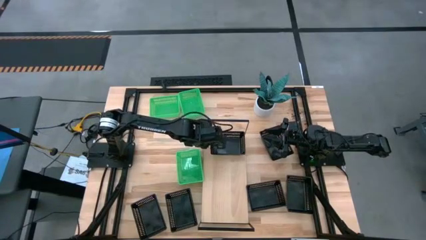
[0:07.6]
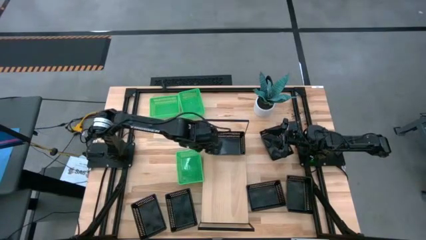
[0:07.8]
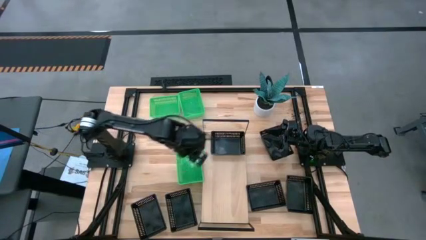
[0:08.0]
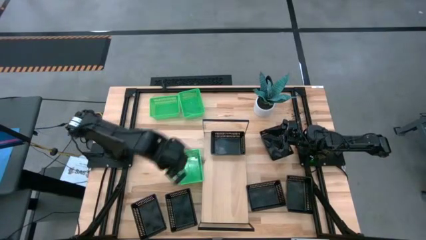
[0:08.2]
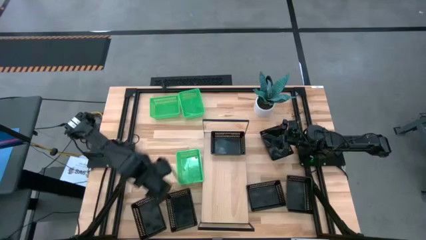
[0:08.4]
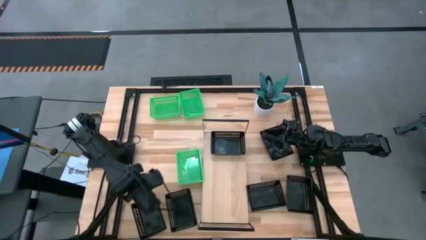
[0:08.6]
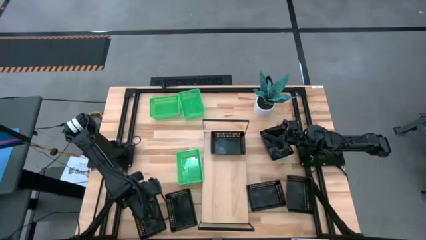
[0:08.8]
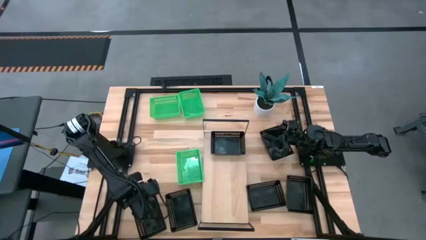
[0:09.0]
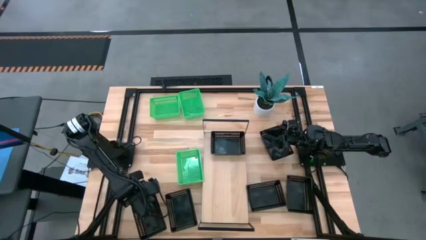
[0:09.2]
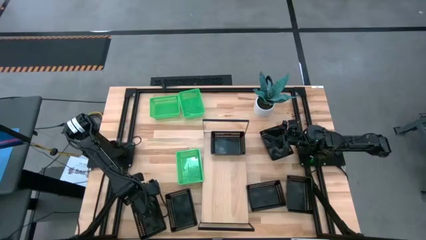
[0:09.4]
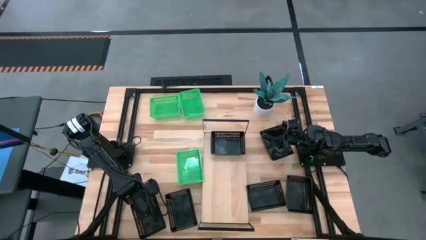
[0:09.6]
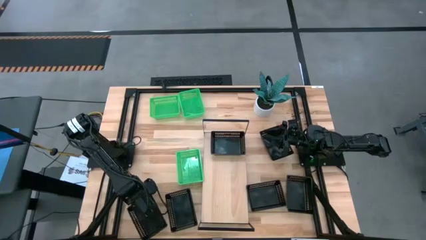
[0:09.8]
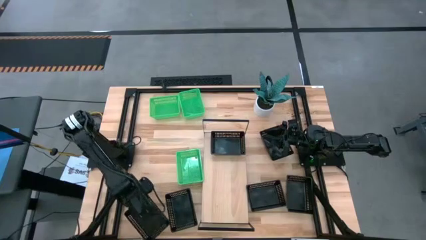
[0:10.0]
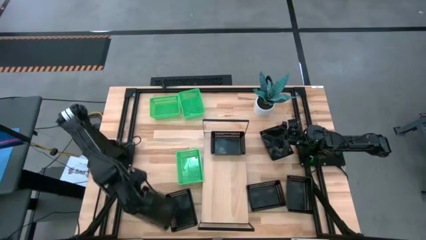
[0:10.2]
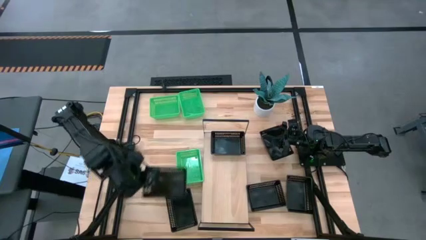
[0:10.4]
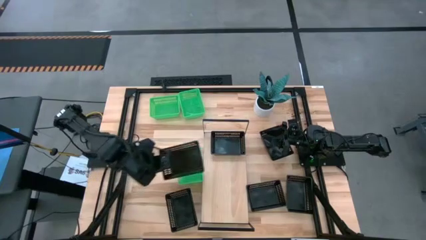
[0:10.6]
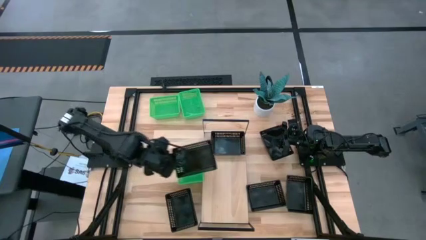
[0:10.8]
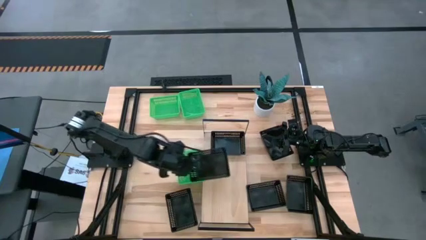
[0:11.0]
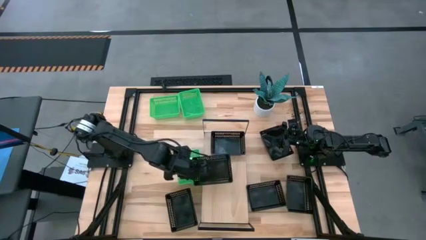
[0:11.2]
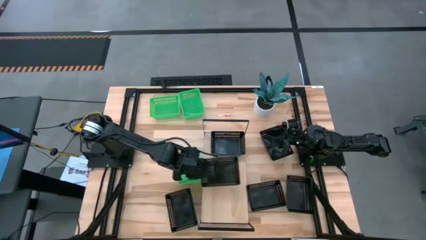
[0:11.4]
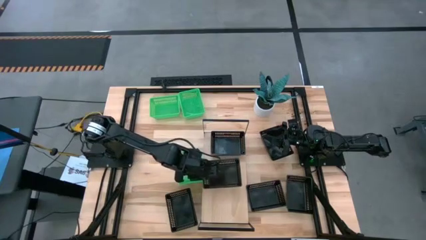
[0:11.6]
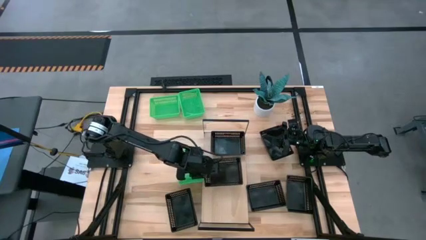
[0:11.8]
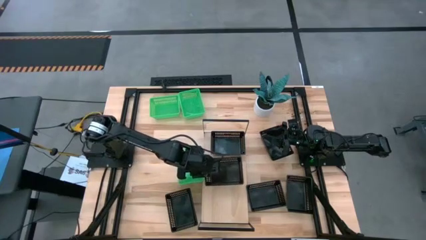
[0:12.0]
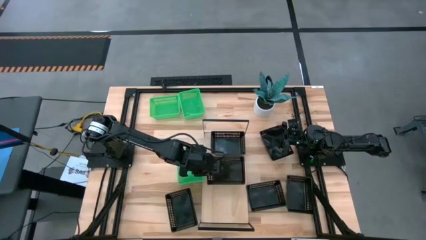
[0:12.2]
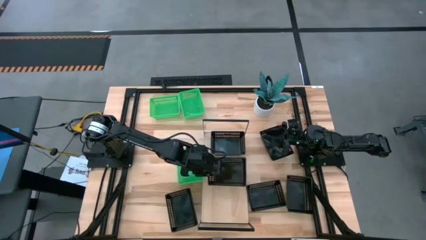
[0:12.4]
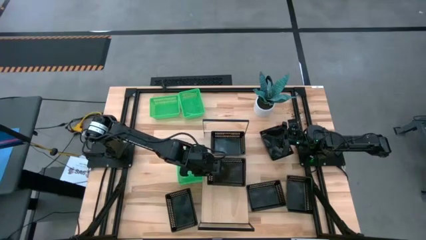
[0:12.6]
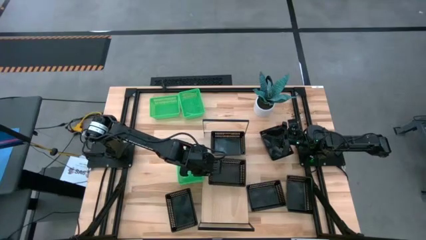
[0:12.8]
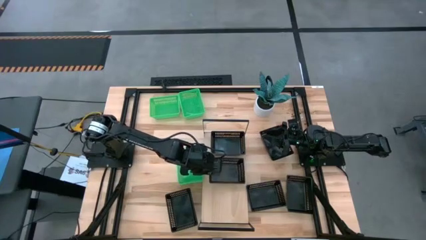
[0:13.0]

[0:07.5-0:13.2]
Task: Stack baskets on shelf by color
Put the black bin on the shelf

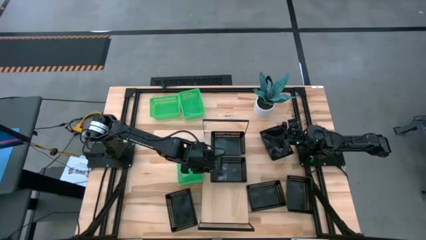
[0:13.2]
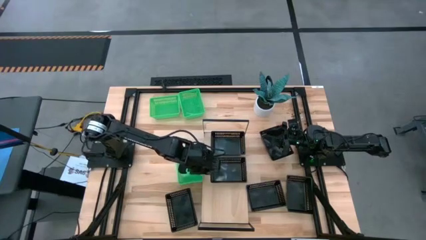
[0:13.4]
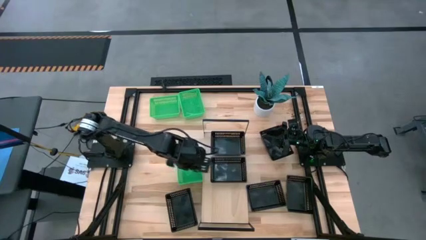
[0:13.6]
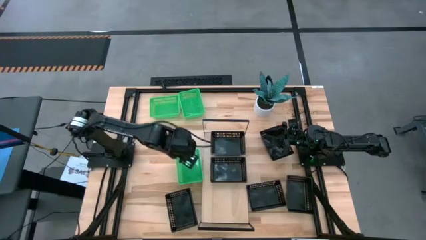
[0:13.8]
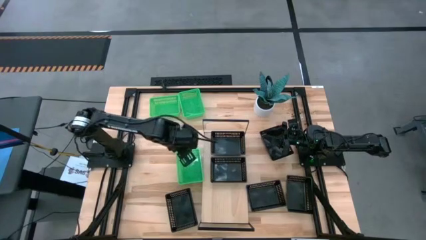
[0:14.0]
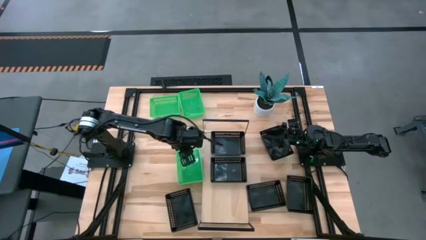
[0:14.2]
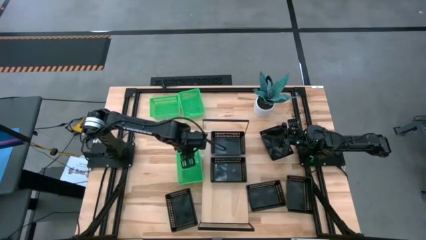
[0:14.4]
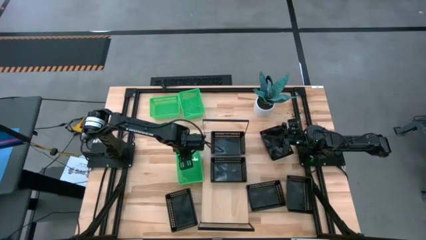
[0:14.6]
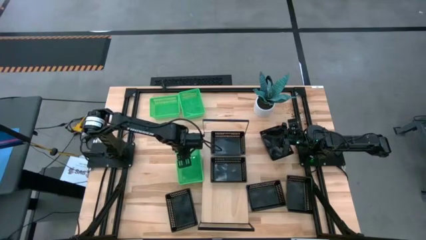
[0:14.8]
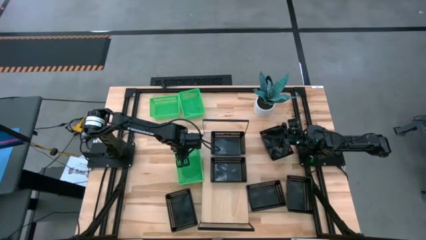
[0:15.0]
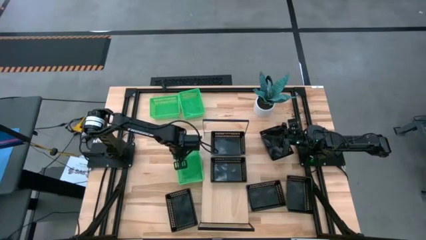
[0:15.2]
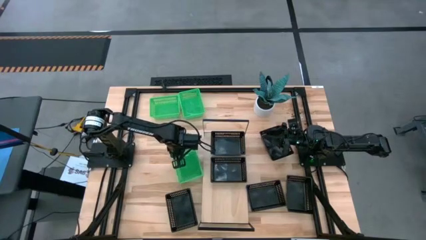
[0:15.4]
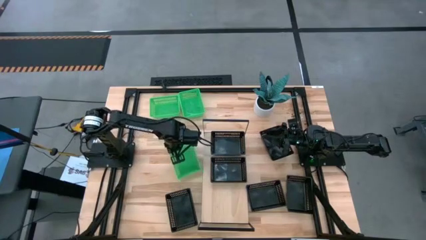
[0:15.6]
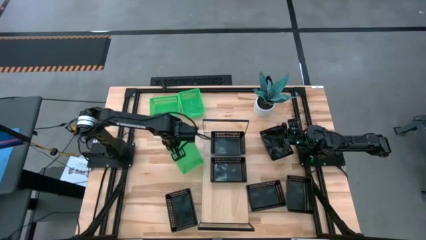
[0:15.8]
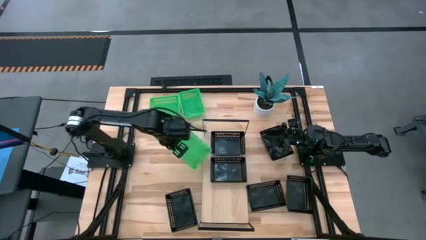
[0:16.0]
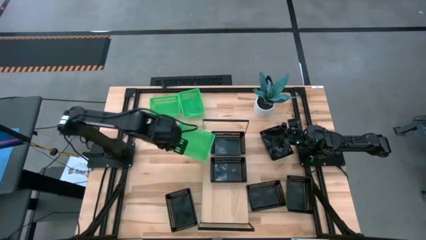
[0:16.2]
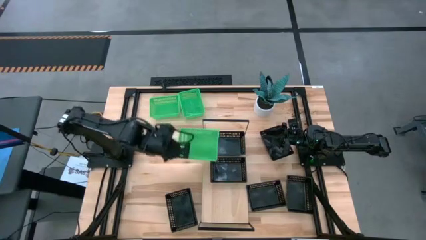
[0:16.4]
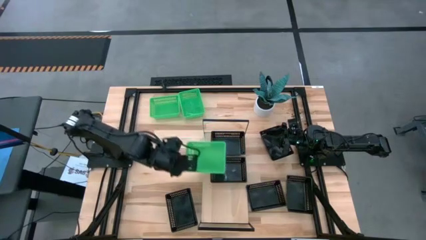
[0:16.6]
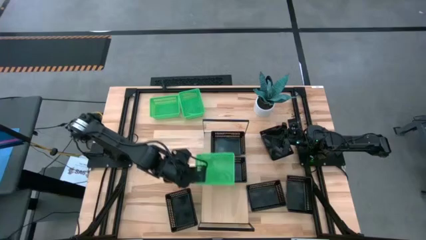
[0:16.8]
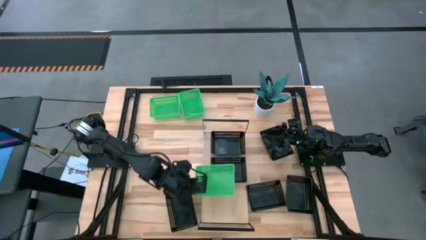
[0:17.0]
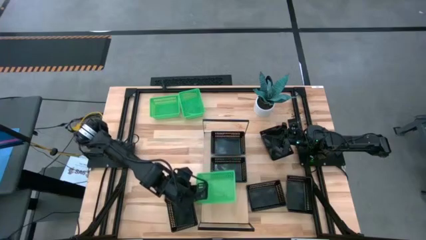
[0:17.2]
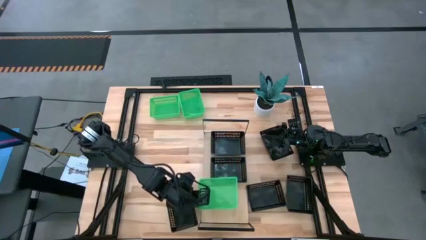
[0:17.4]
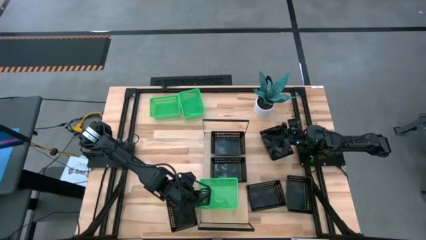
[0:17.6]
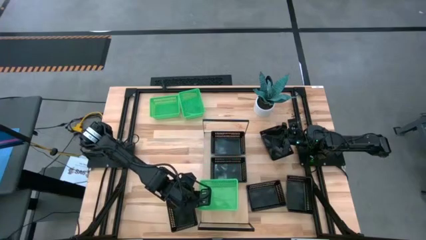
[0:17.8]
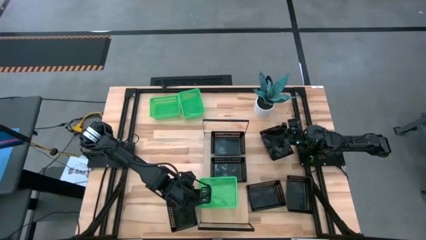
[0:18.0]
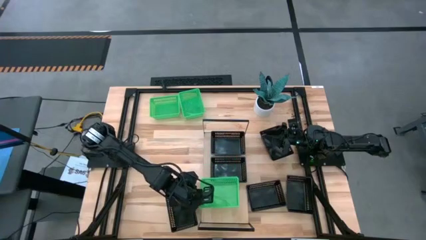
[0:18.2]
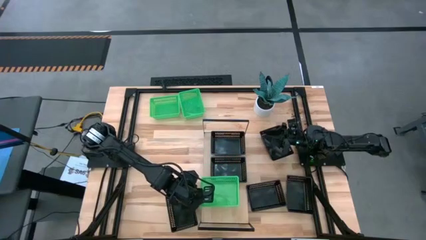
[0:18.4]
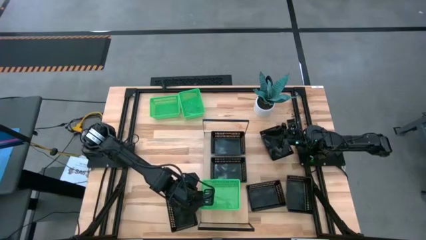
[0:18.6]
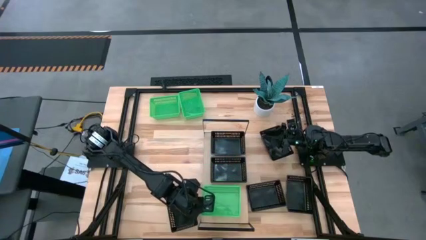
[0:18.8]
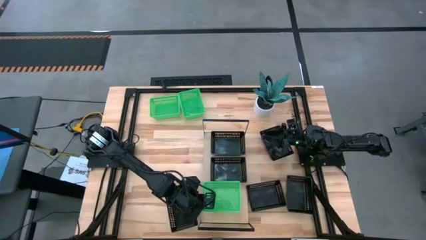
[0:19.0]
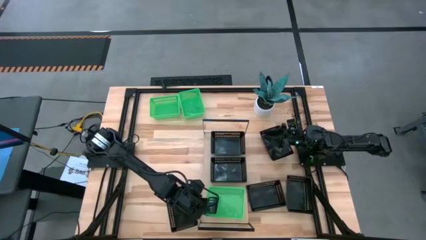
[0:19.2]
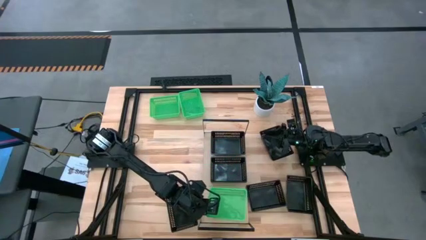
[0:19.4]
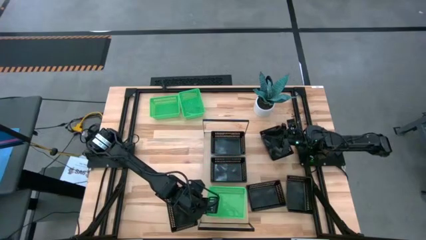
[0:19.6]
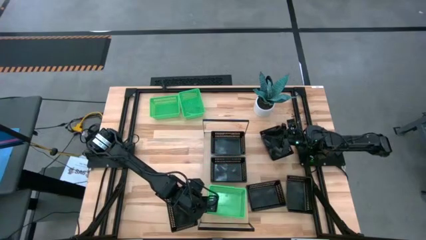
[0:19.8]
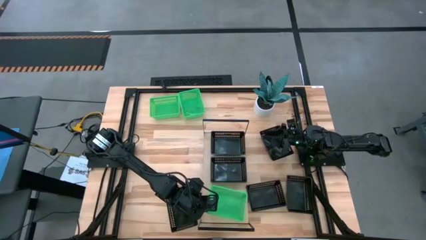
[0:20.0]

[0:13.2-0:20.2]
Put the green bin on the shelf

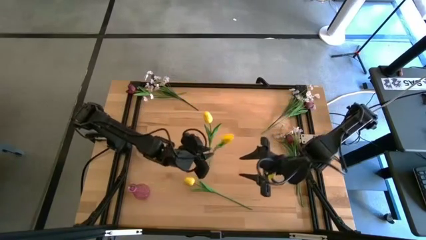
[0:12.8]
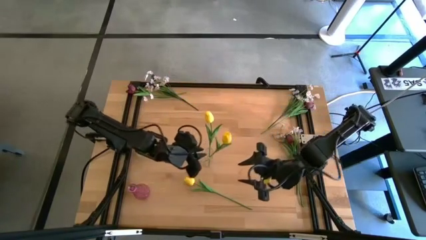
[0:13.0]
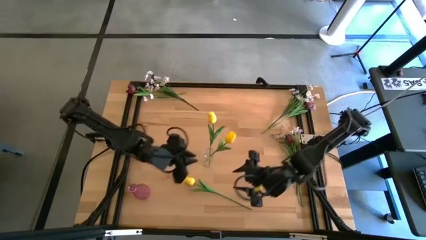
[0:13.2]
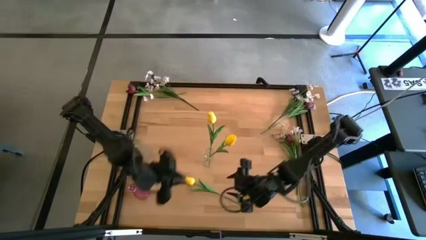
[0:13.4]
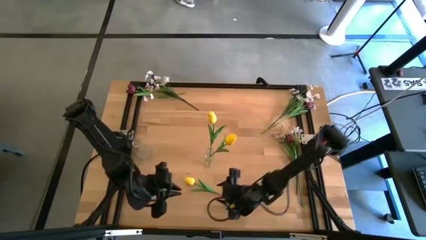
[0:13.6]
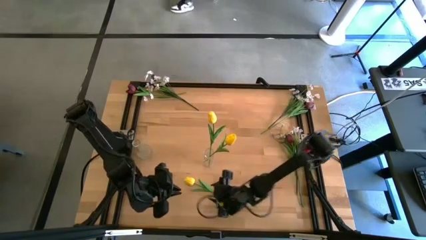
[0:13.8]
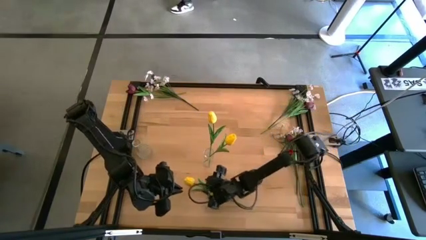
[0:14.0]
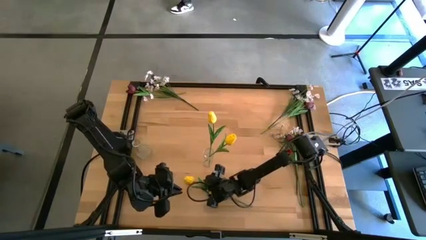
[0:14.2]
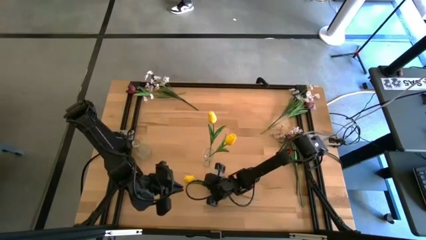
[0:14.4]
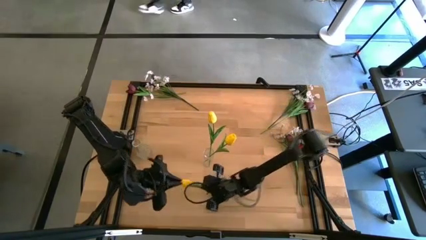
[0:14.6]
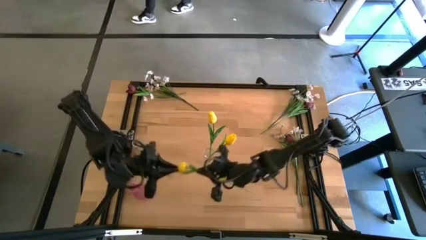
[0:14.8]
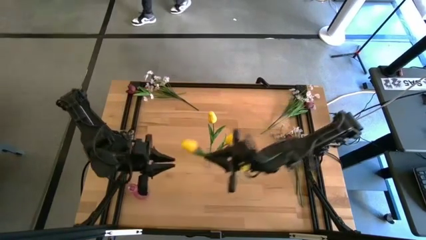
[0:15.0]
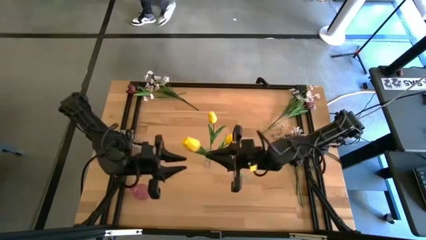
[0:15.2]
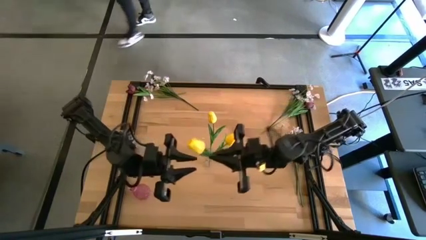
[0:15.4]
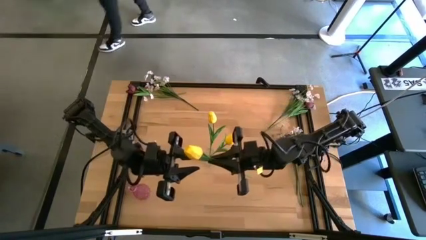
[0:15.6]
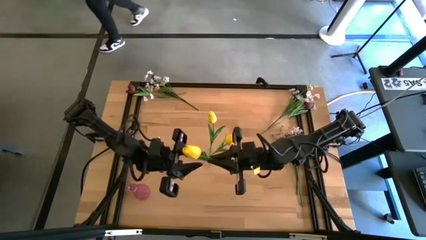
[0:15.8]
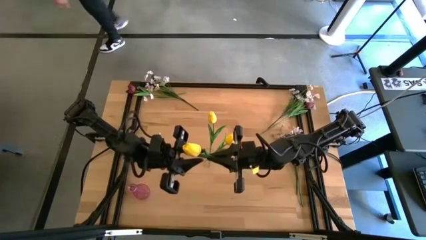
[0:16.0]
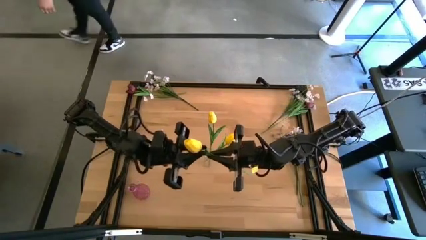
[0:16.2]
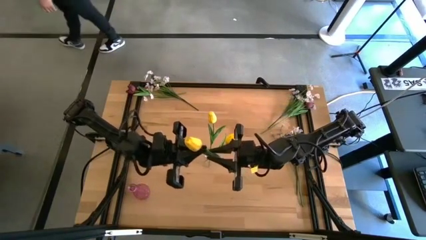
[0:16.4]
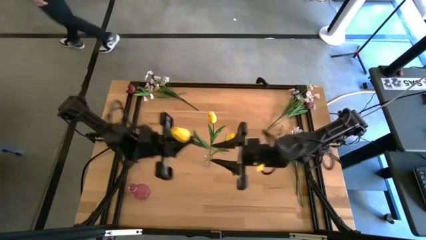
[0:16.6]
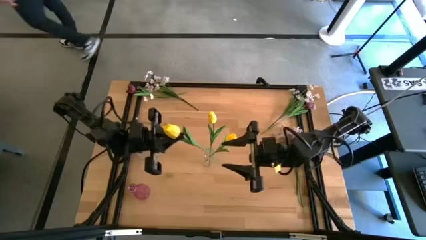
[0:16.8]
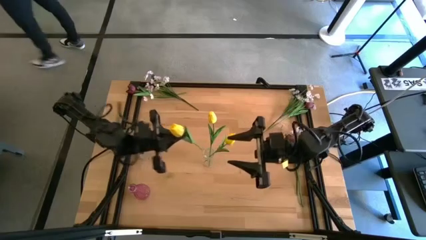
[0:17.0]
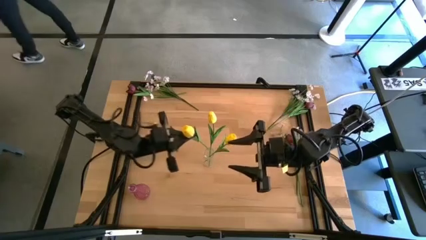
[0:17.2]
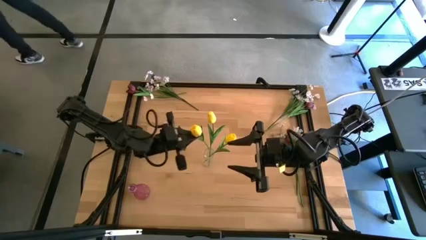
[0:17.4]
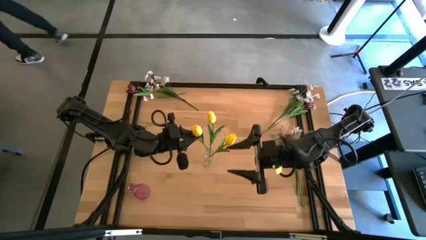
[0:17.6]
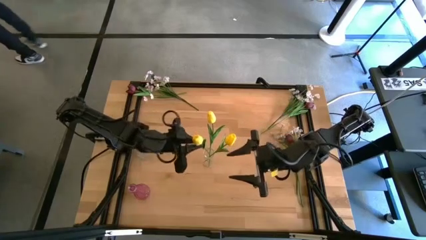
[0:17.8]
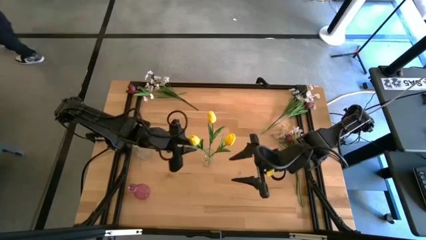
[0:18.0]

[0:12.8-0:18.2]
Task: Sort flowers into vase by color
Put the yellow flower into the right transparent vase
